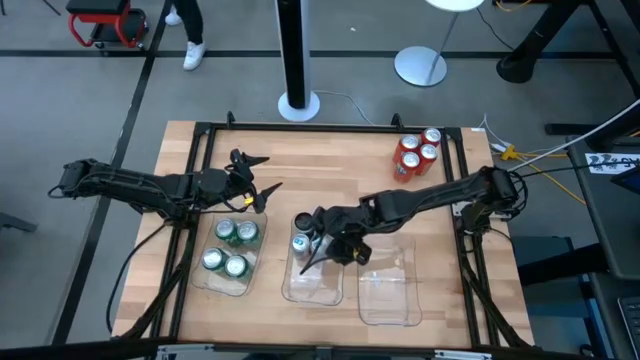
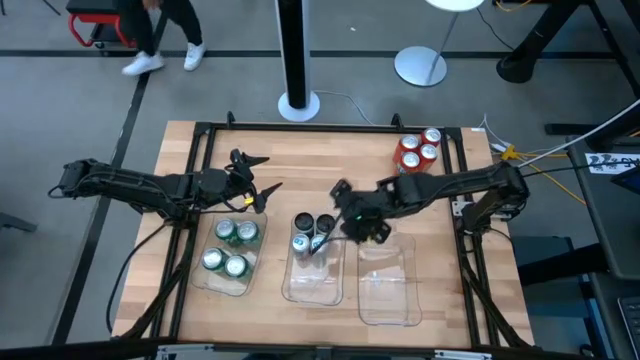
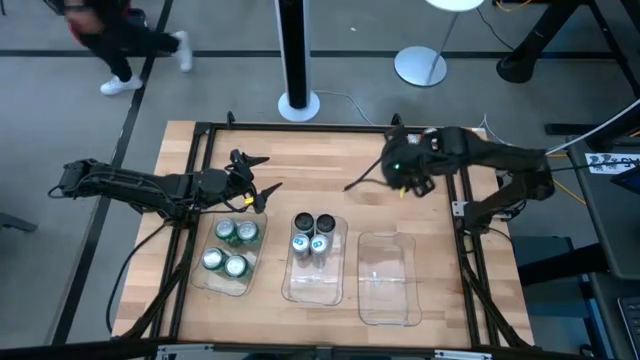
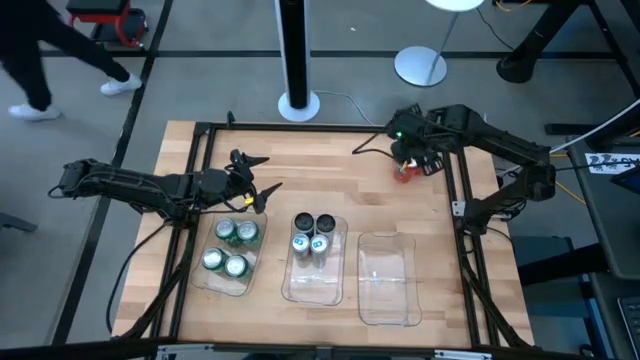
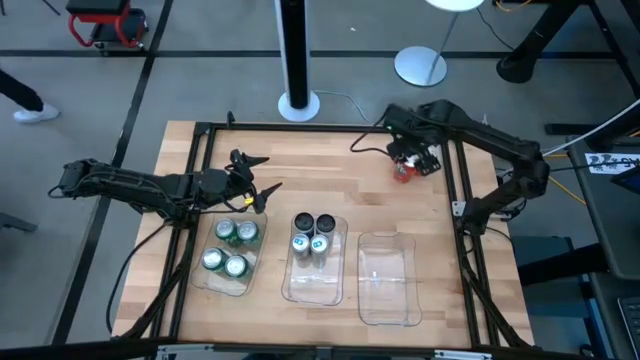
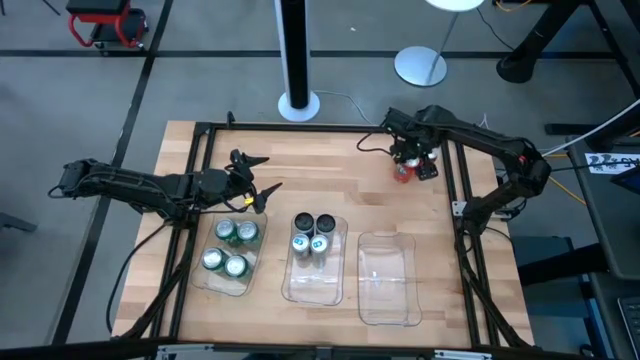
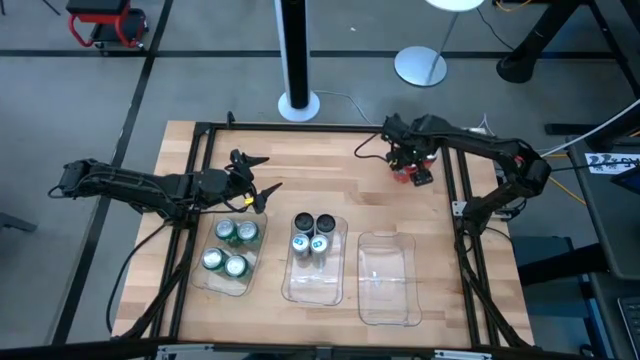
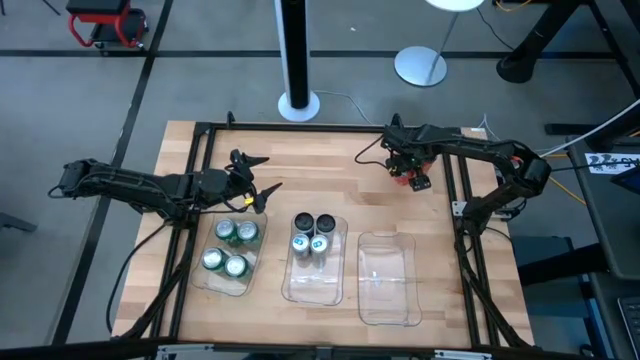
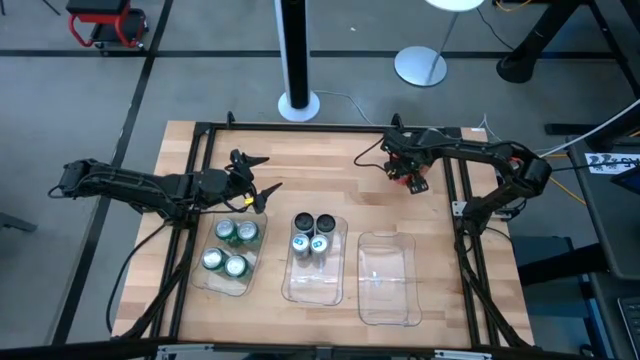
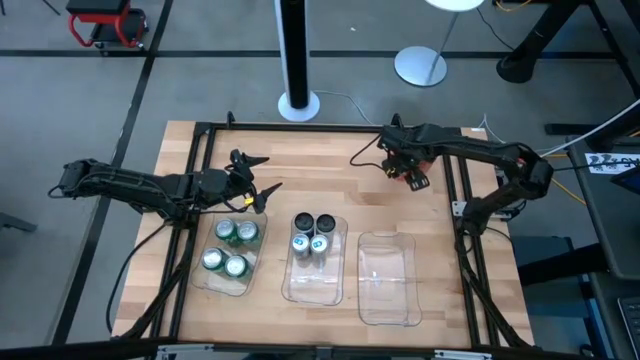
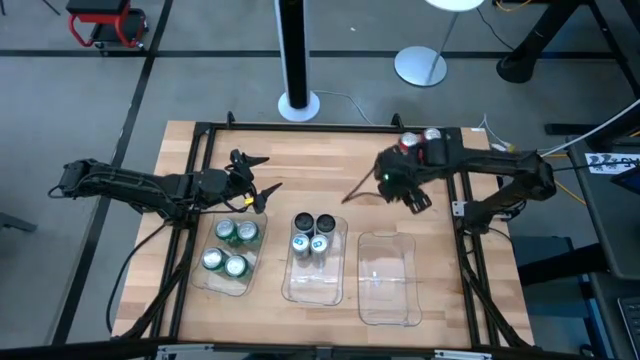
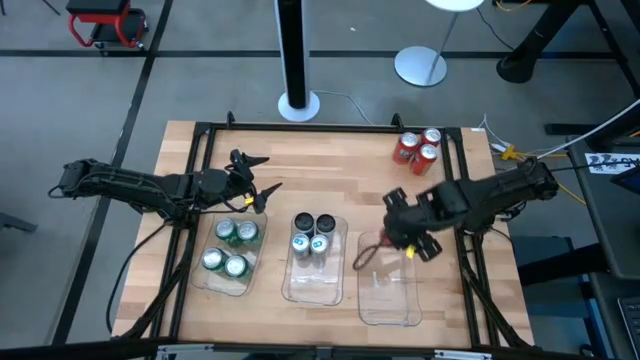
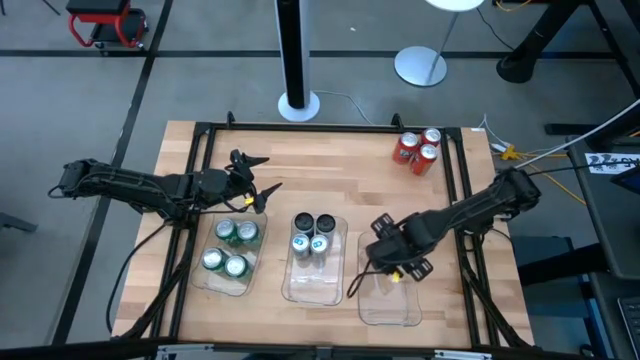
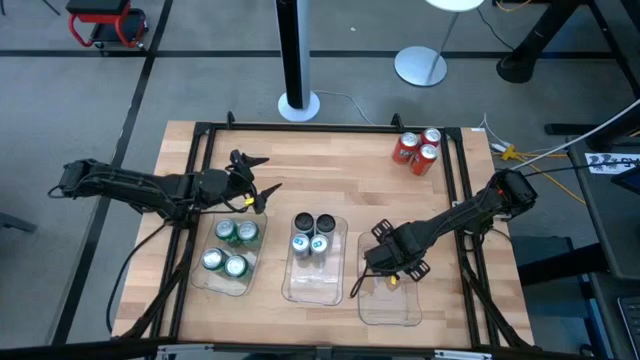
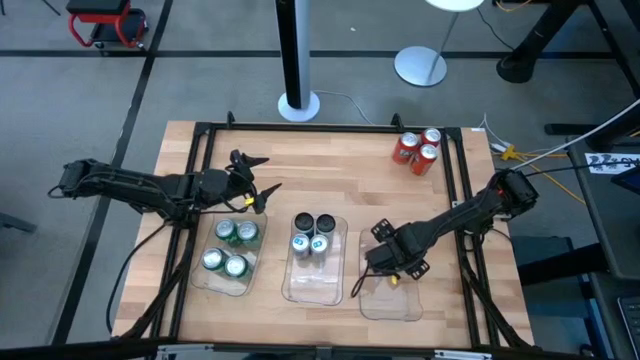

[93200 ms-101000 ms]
Task: Sort soda cans
Put the bottom left orange soda can into the right transparent bin

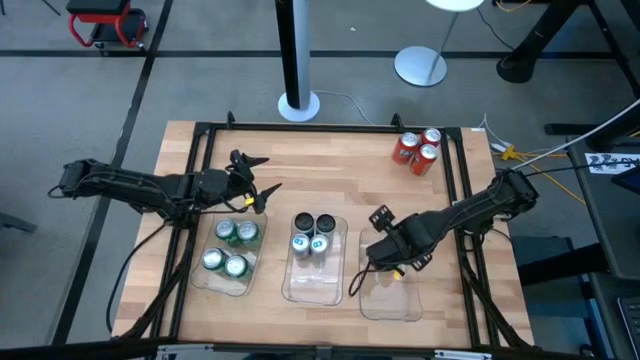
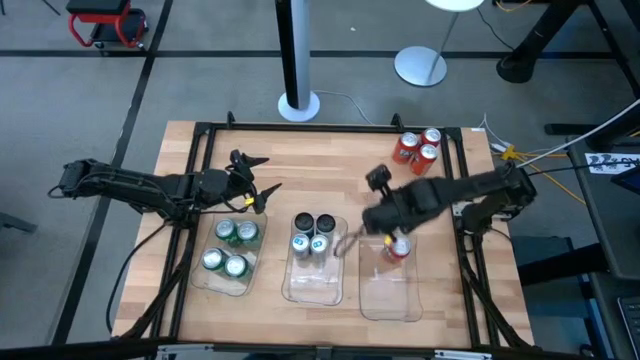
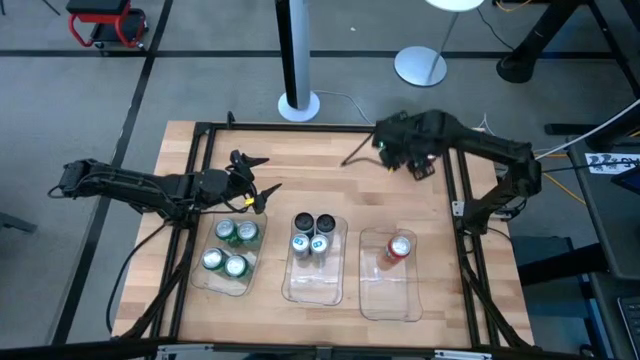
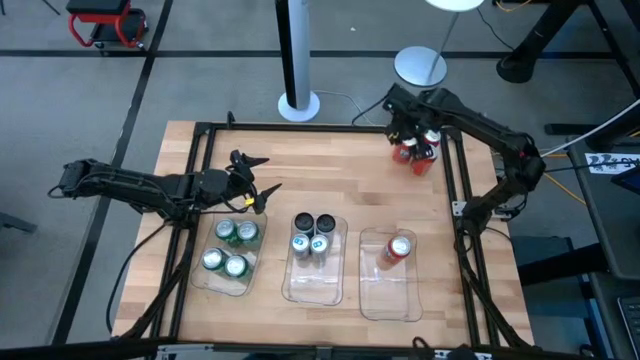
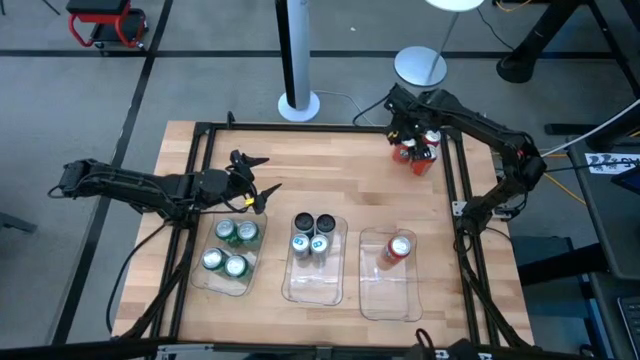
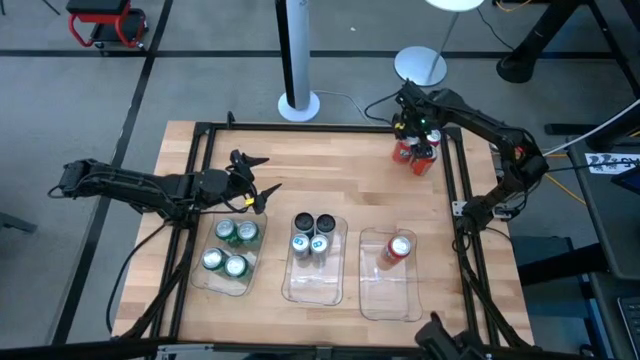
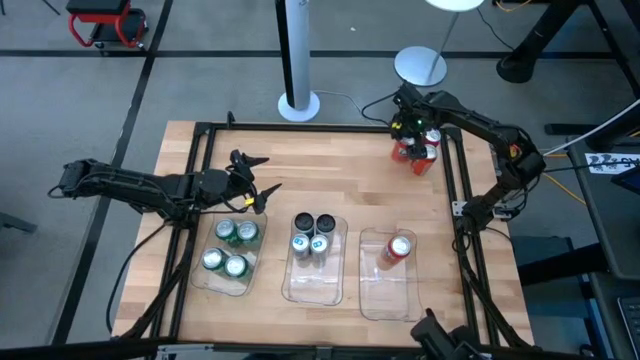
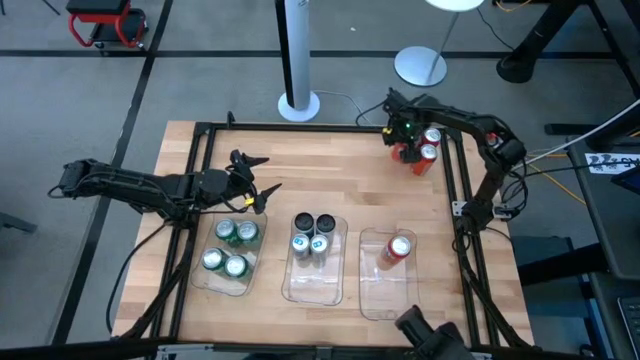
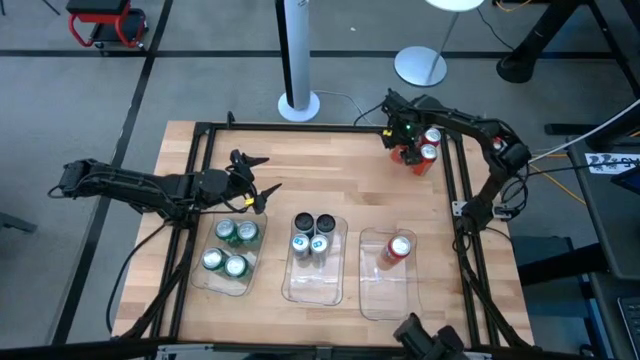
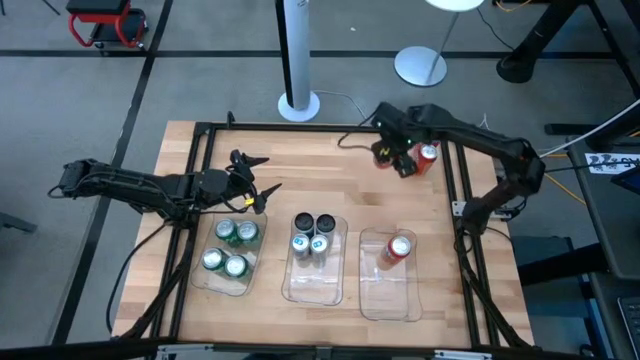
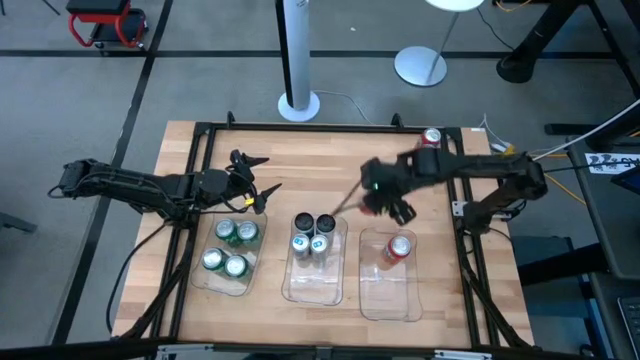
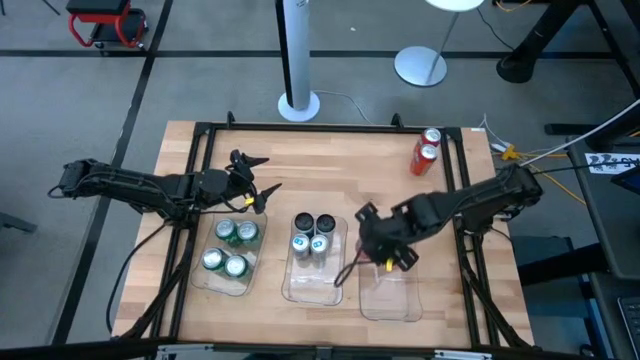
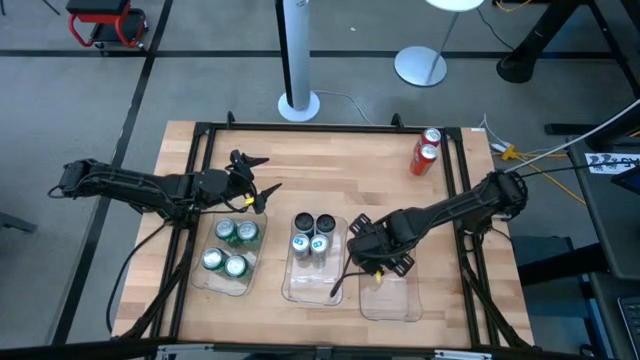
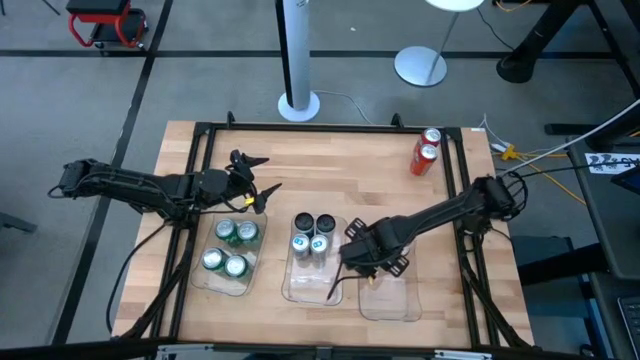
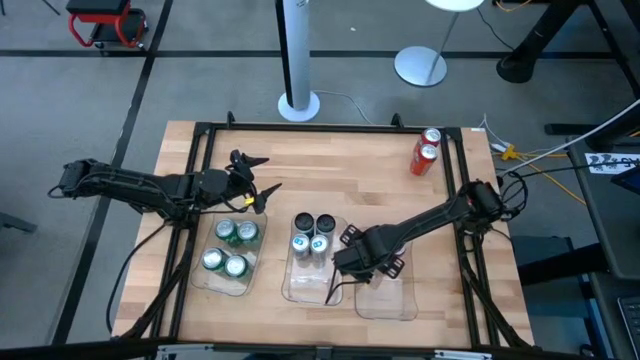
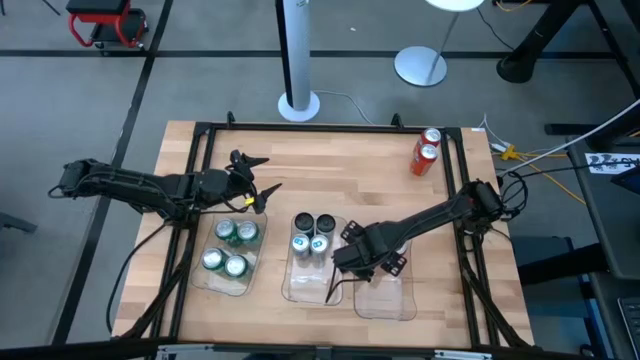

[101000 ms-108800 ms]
Put the top left orange soda can into the right transparent bin

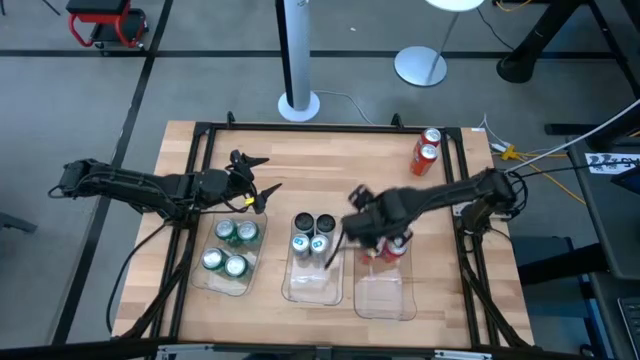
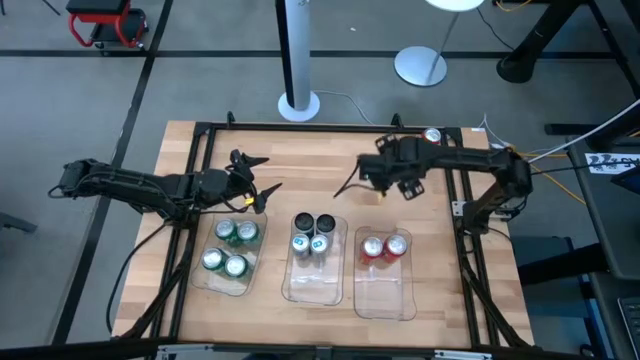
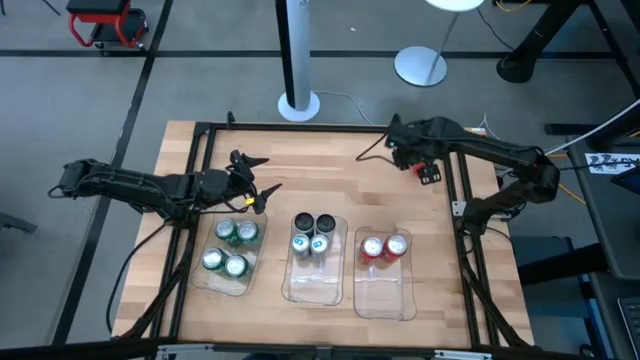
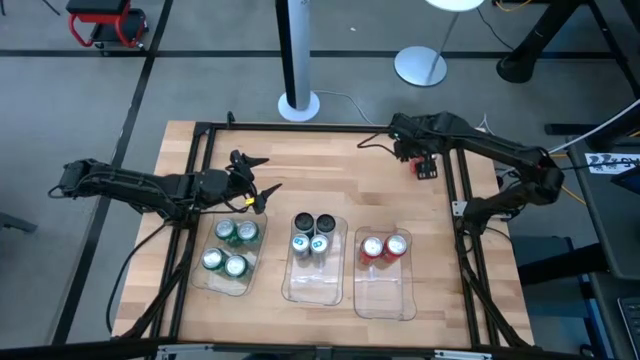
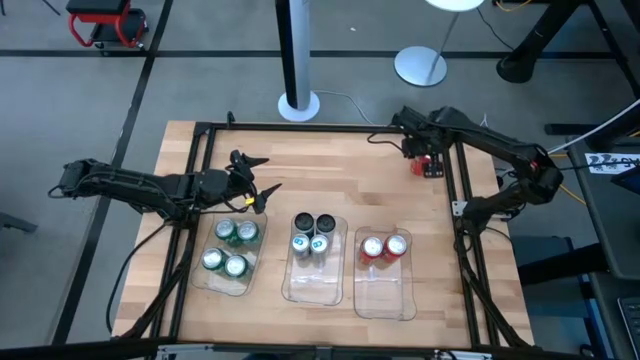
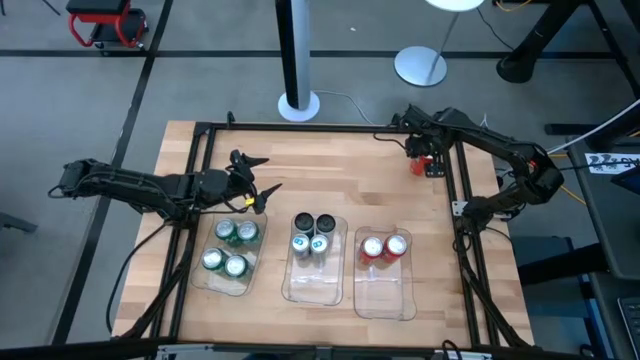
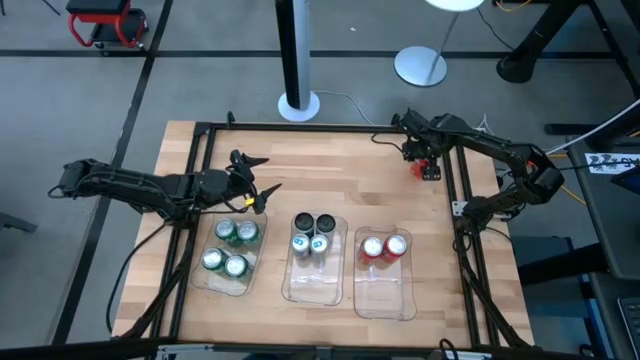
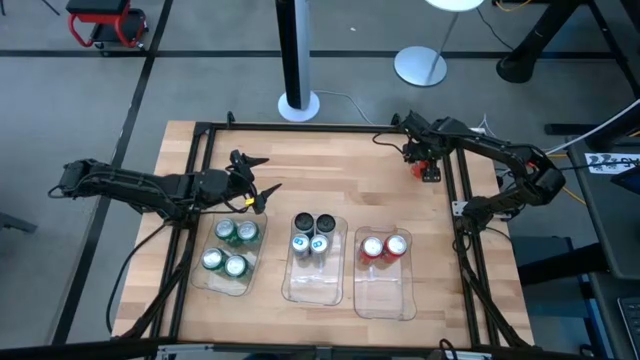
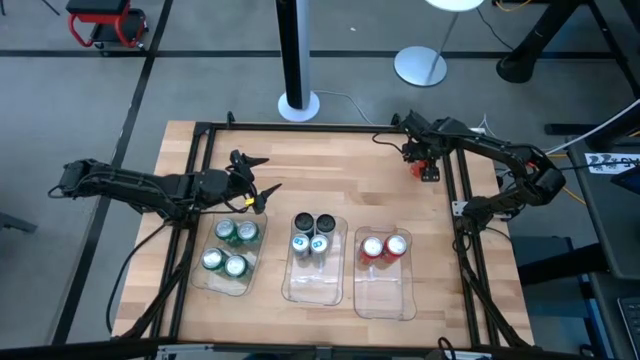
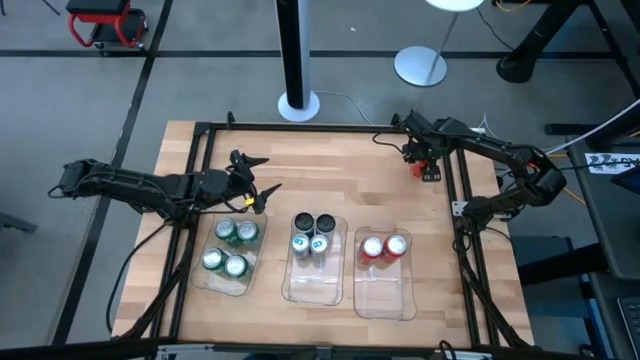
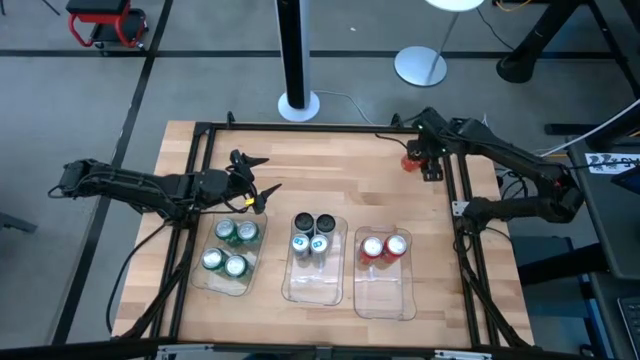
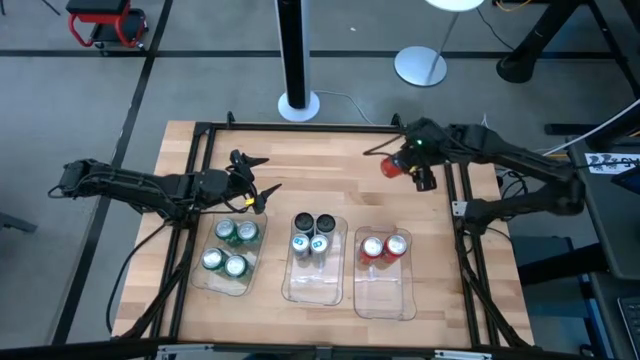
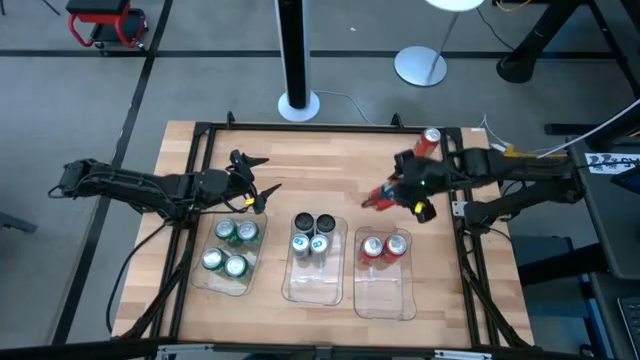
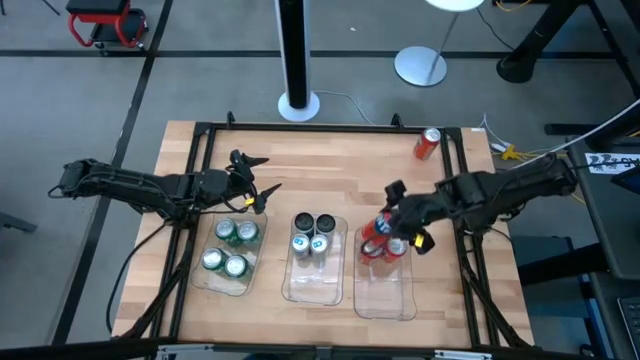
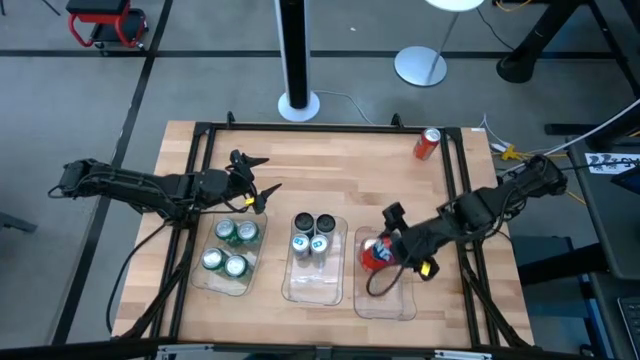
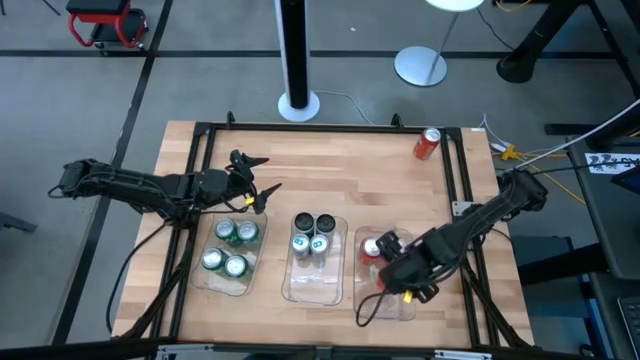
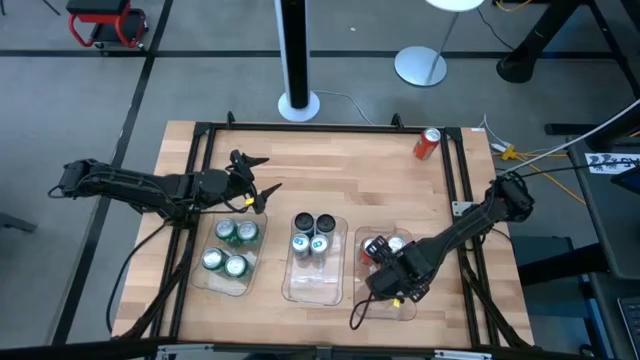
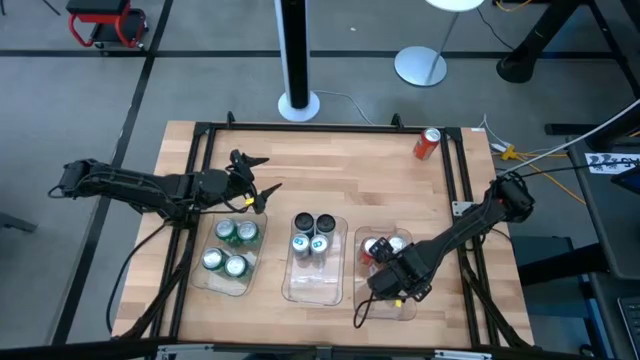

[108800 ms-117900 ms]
Put the bottom orange soda can into the right transparent bin
